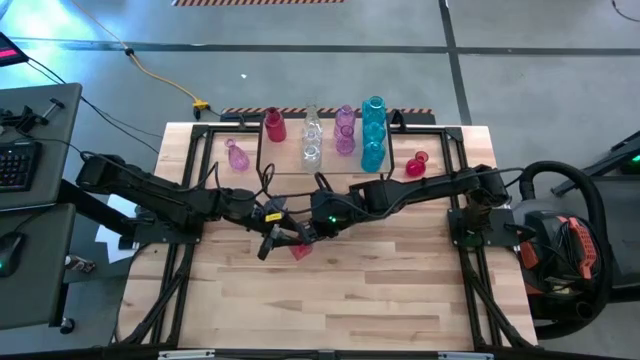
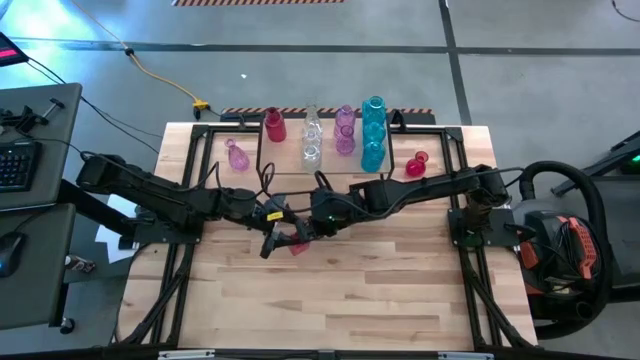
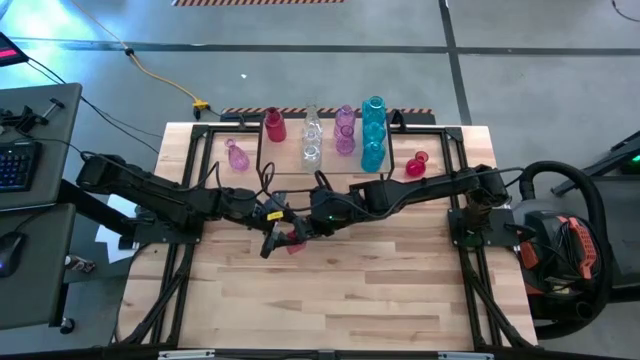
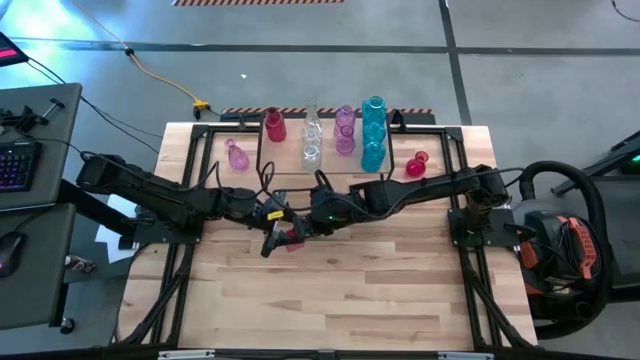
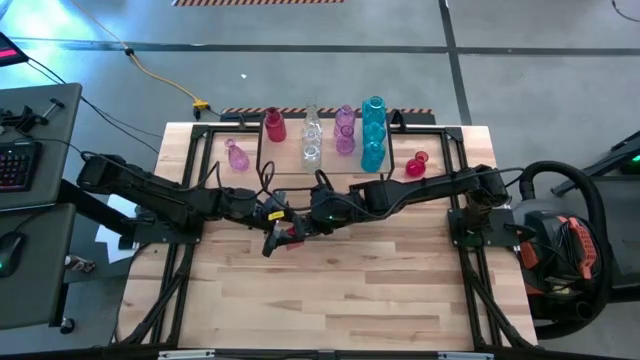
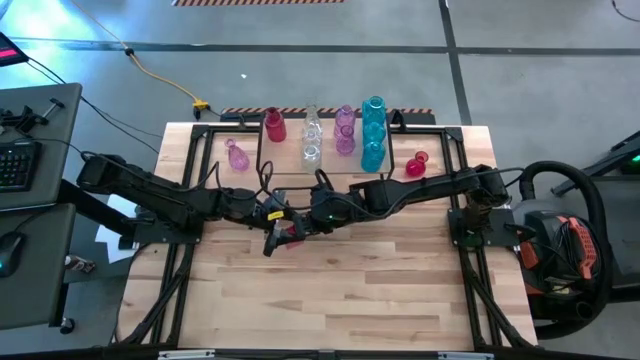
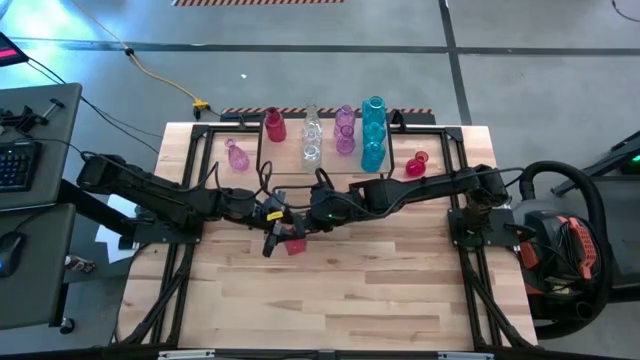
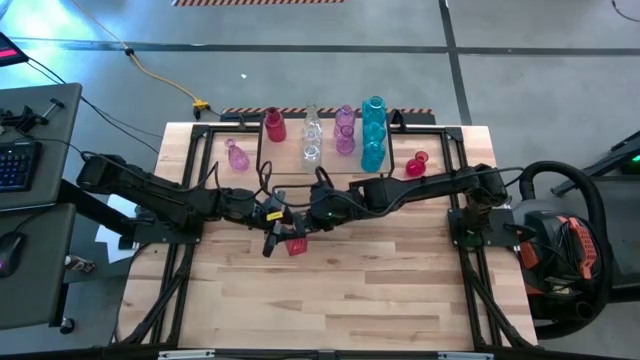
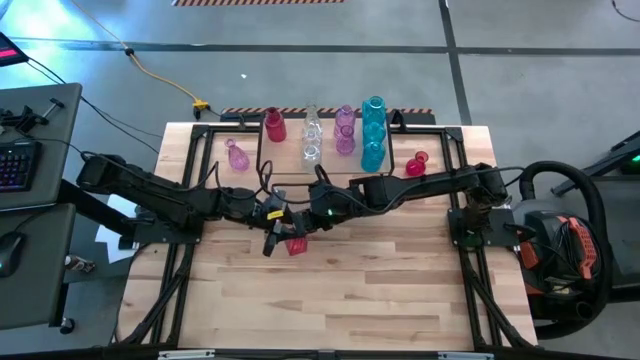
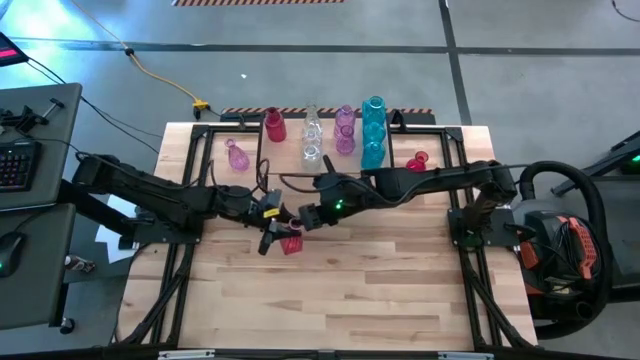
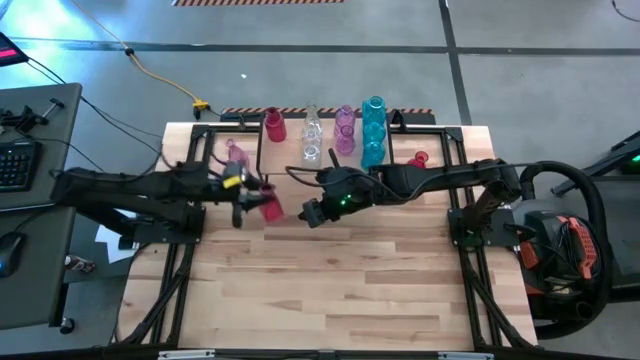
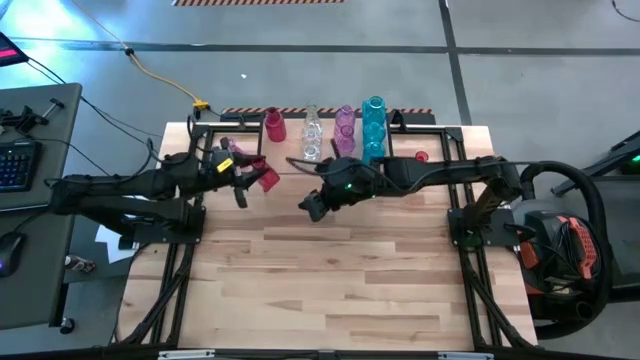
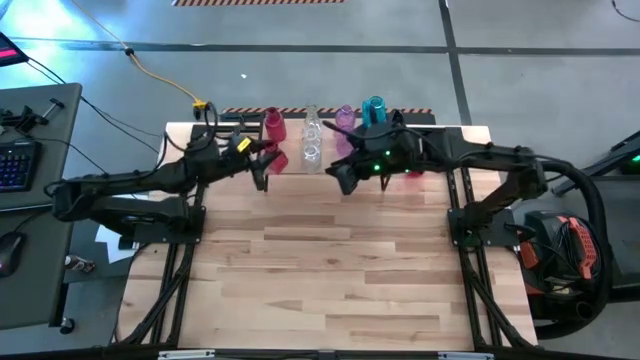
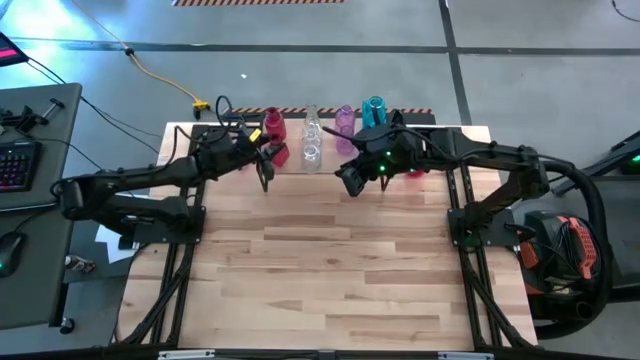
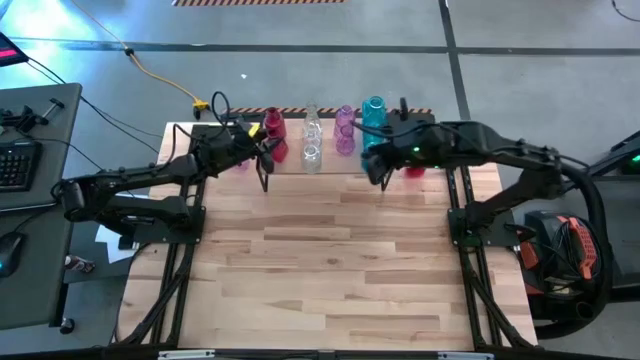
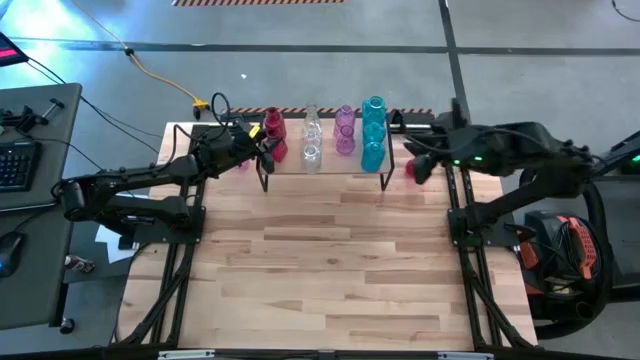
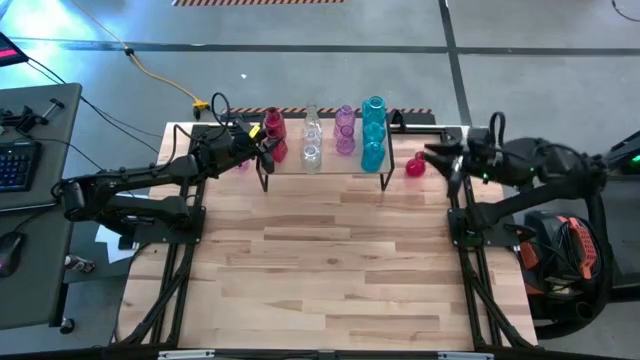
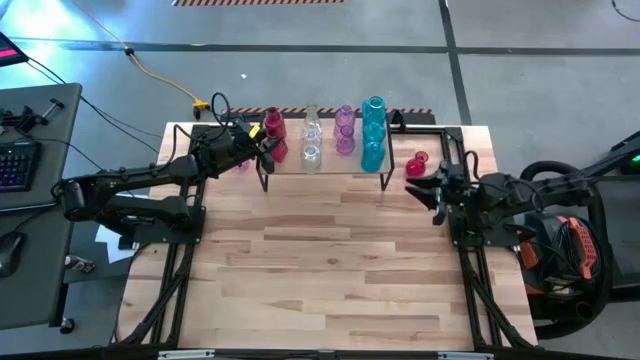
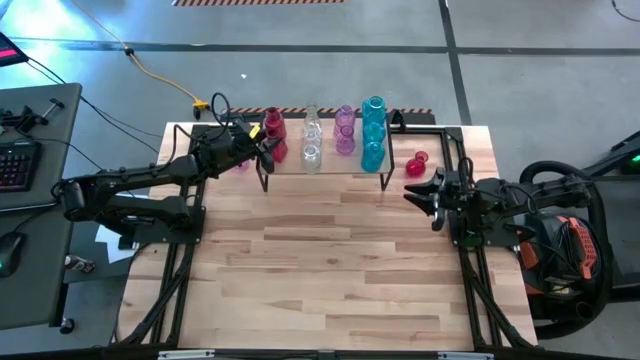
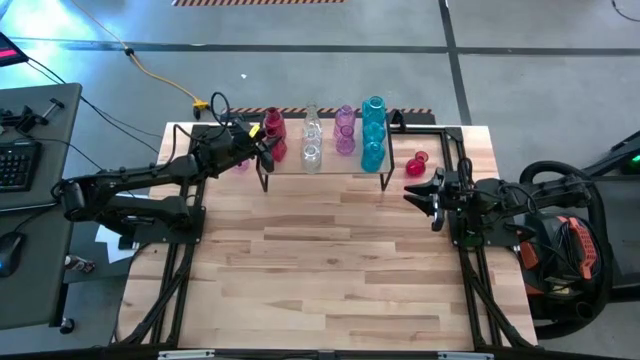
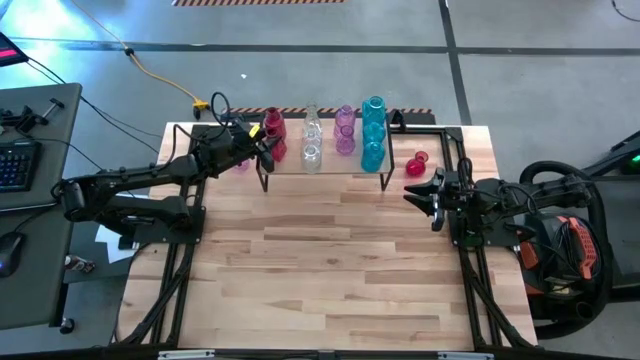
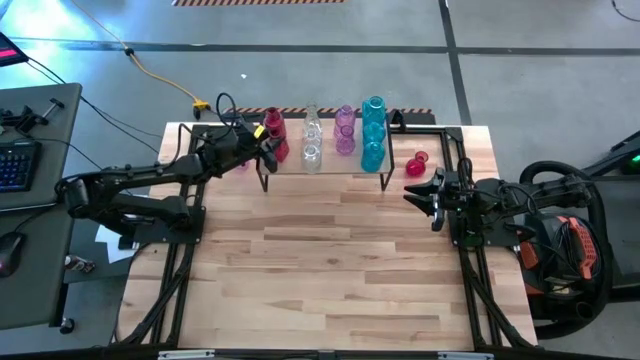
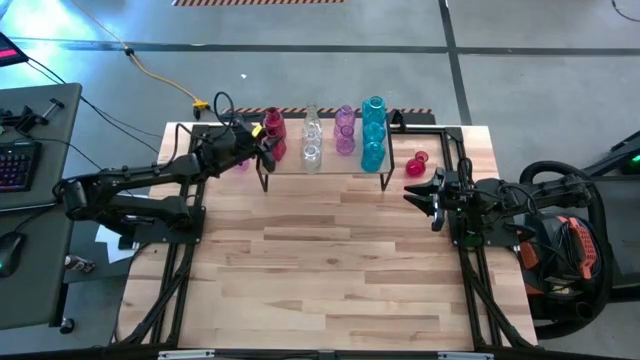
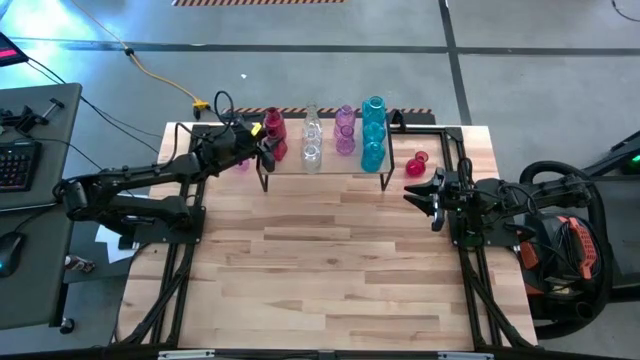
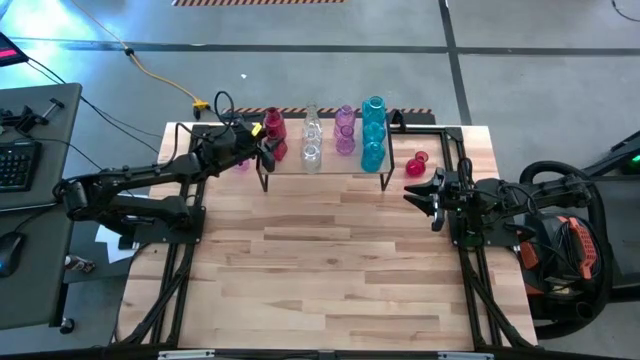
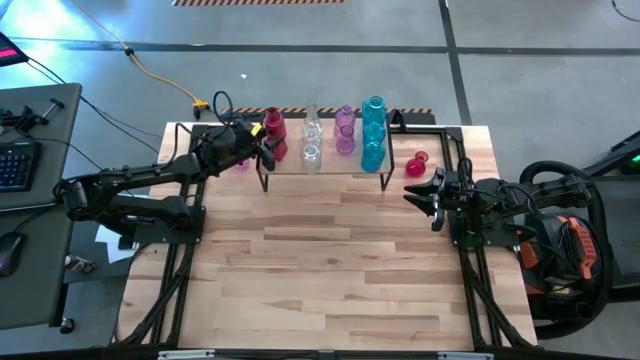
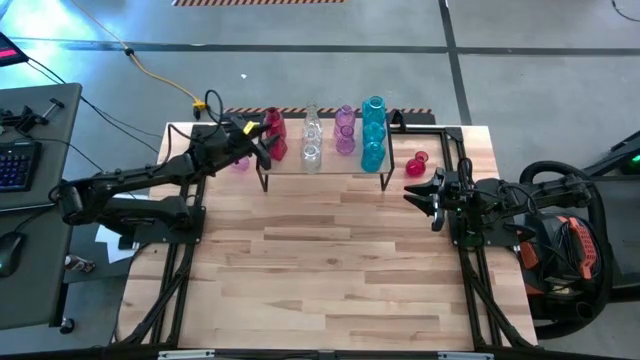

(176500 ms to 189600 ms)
Task: sort vases onto shelf
Put the bottom red vase on the shelf aligned with the other red vase

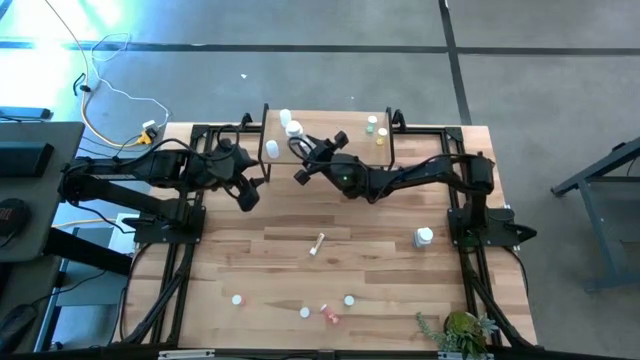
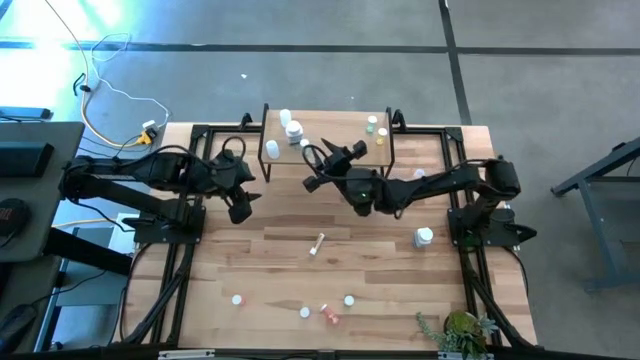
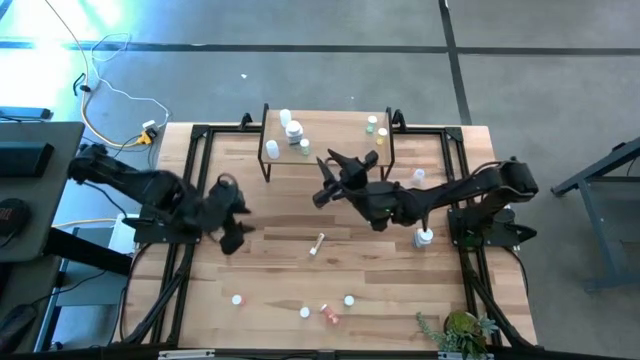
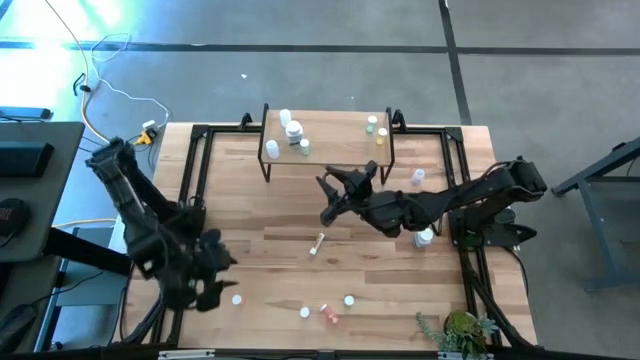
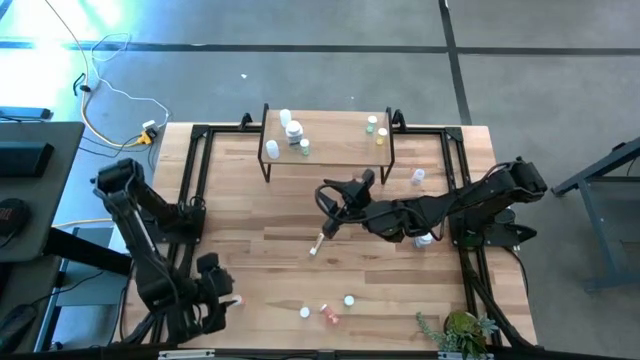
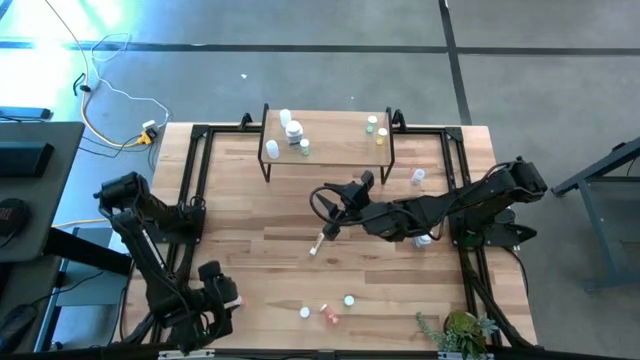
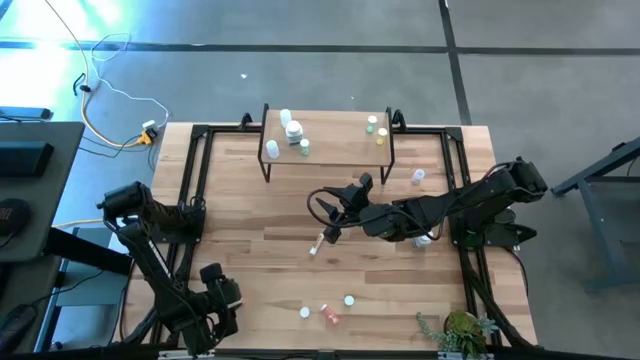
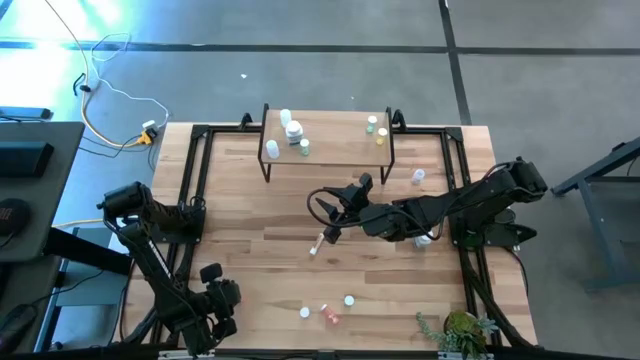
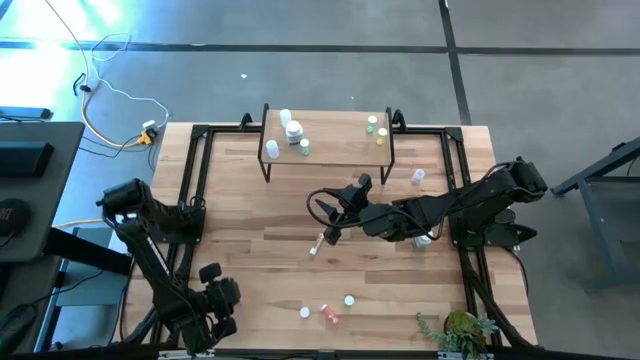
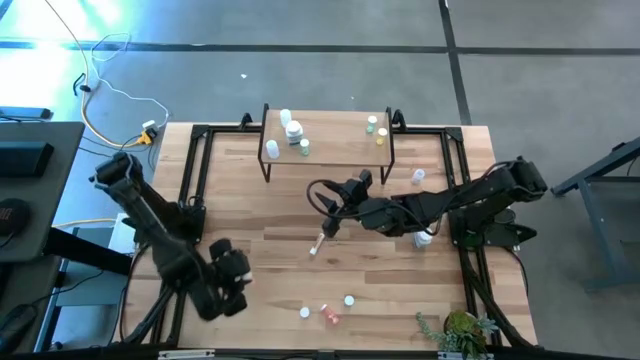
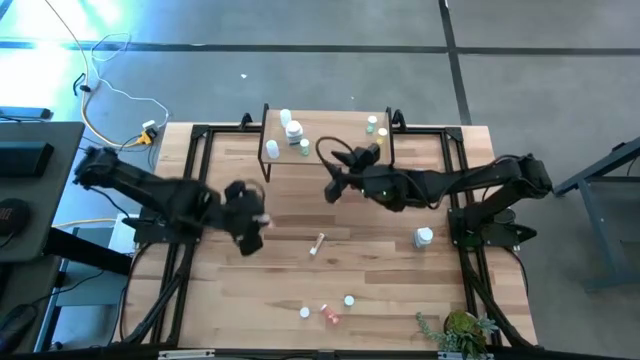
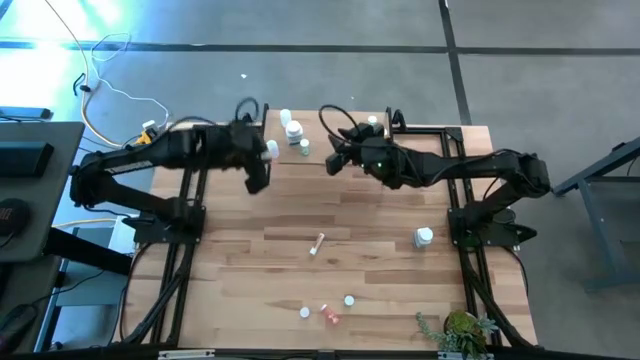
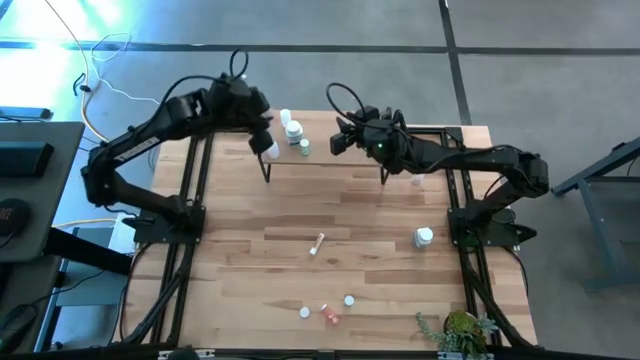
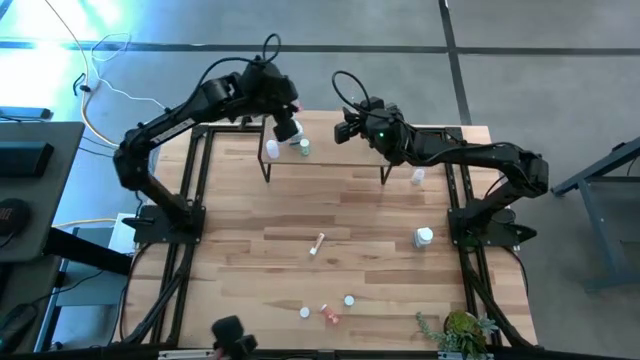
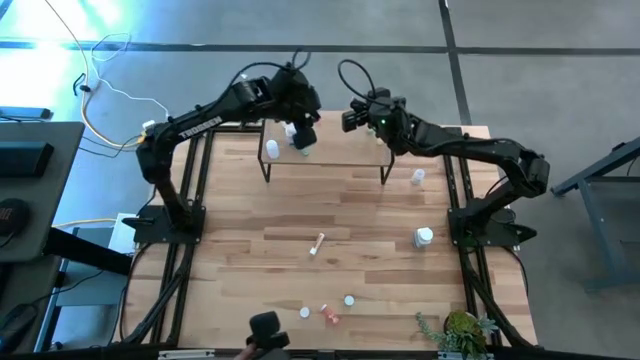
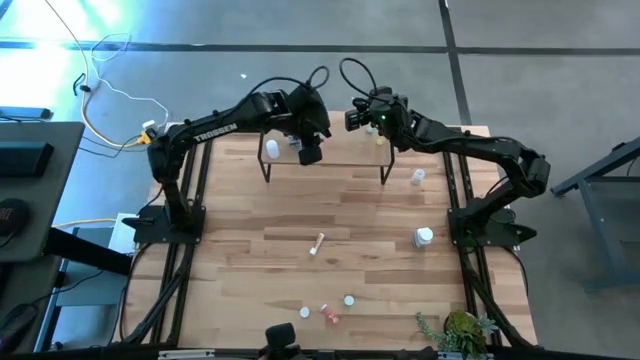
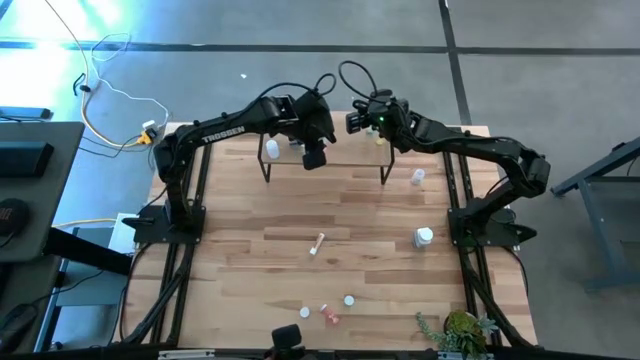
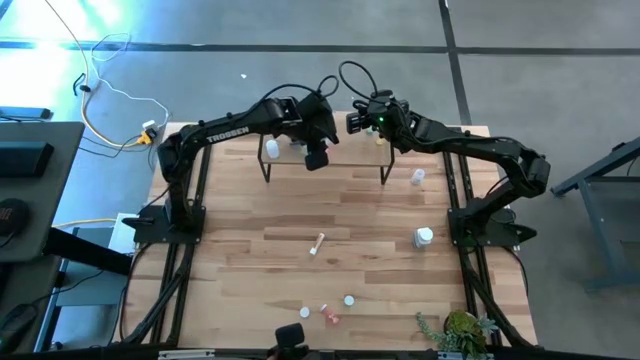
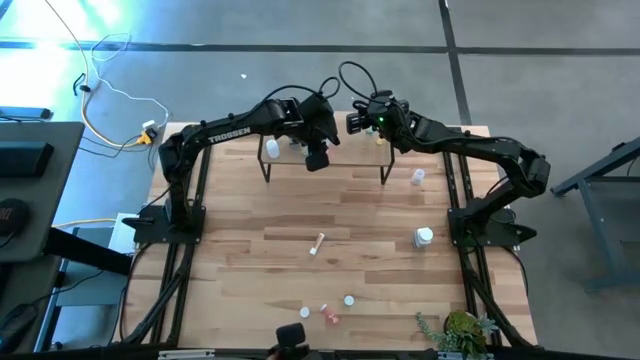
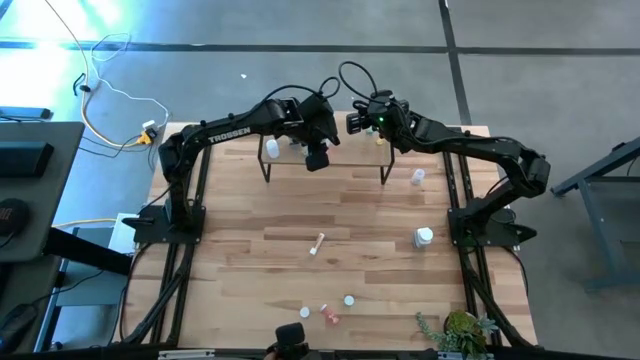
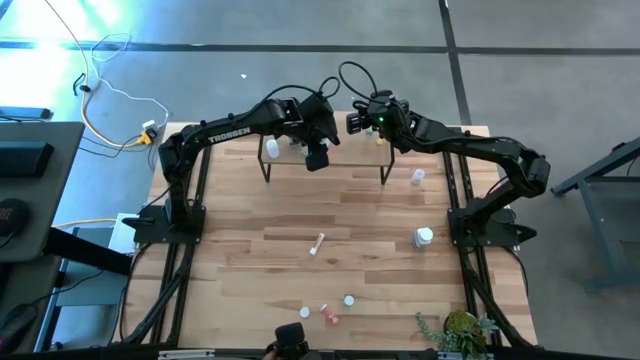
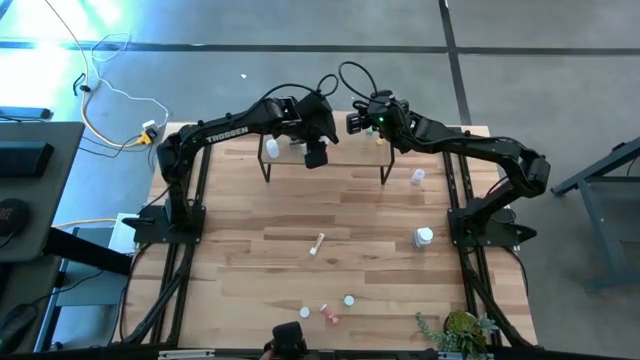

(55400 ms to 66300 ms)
Task: Pick and place medicine bottles onto shelf by color
Put the left orange pill bottle on the shelf
